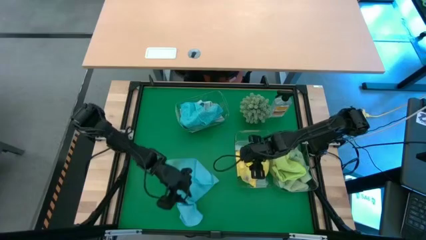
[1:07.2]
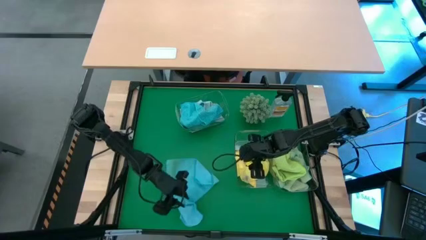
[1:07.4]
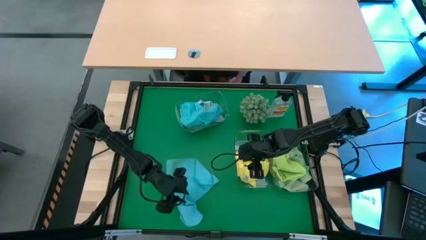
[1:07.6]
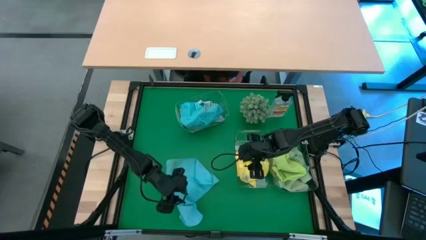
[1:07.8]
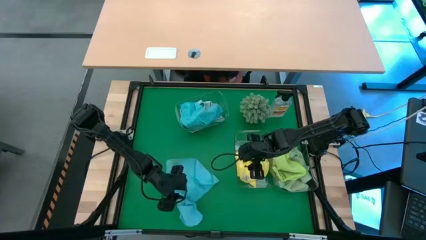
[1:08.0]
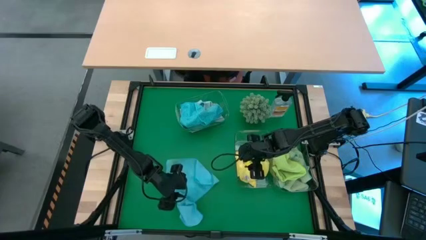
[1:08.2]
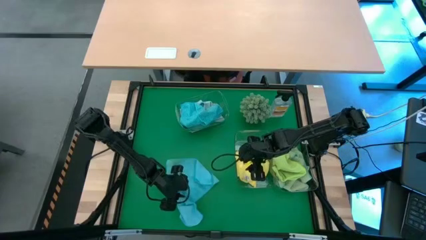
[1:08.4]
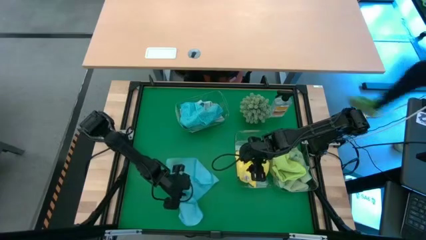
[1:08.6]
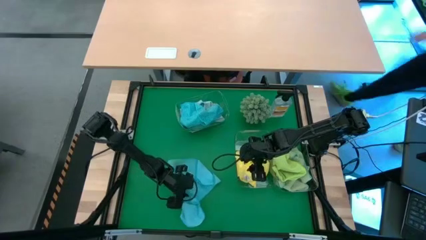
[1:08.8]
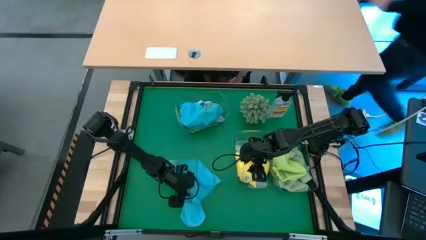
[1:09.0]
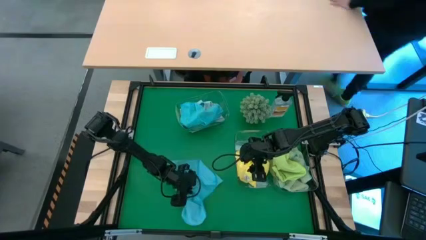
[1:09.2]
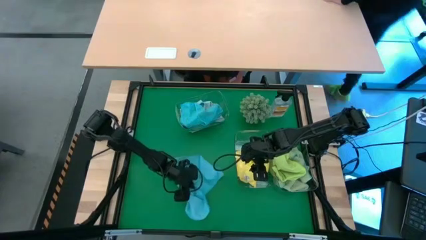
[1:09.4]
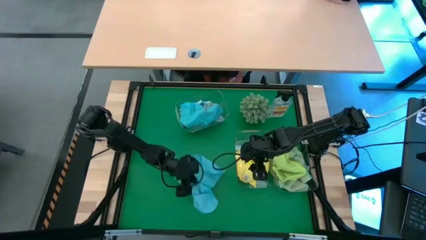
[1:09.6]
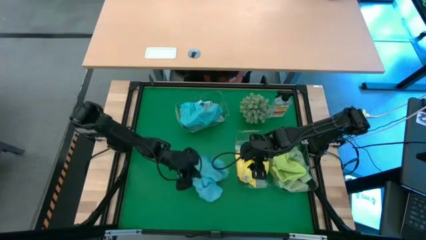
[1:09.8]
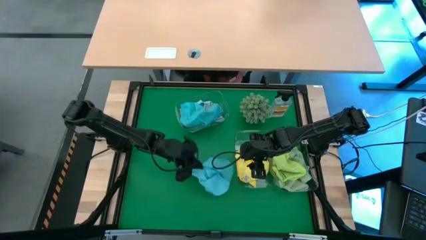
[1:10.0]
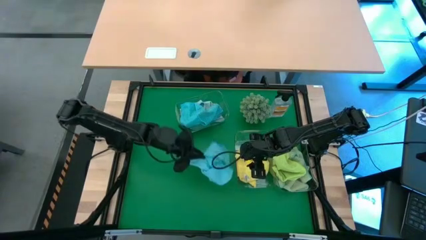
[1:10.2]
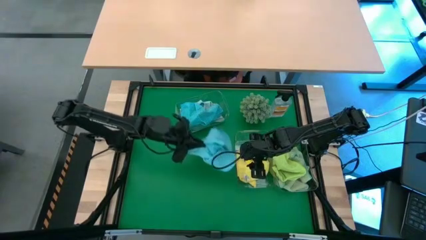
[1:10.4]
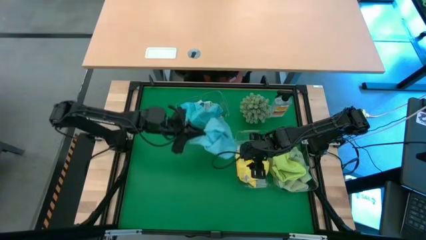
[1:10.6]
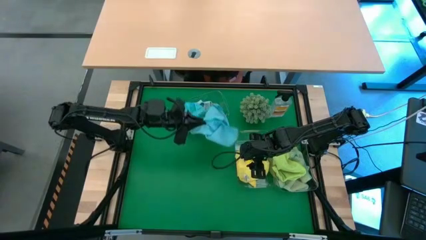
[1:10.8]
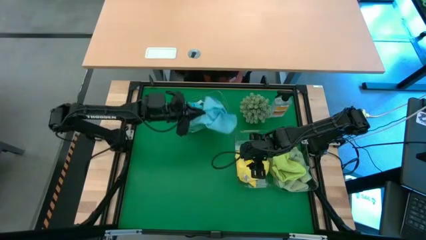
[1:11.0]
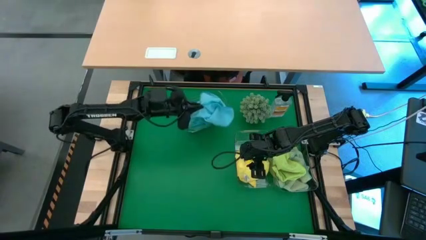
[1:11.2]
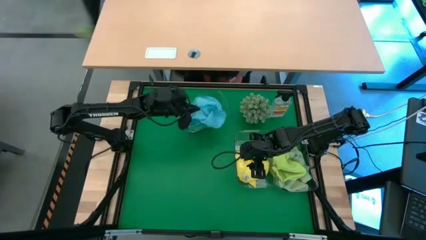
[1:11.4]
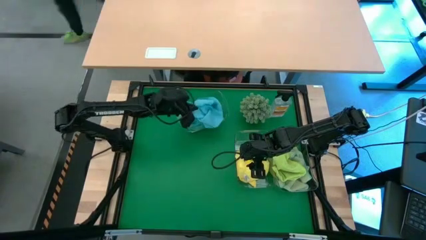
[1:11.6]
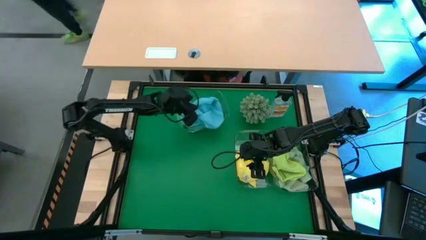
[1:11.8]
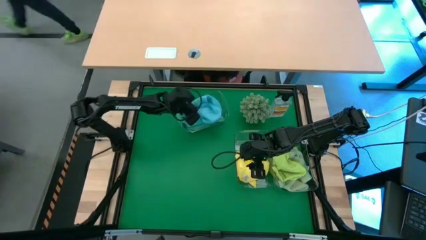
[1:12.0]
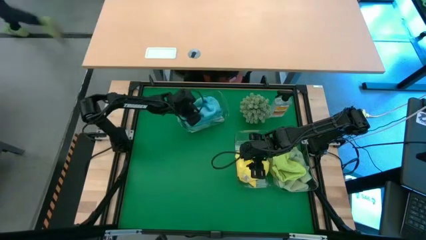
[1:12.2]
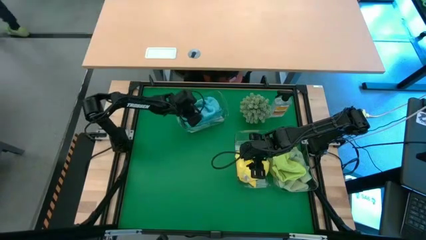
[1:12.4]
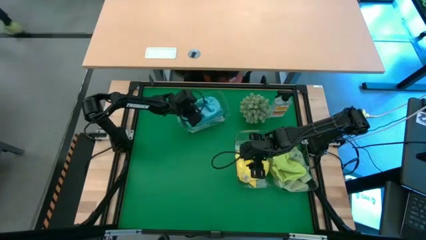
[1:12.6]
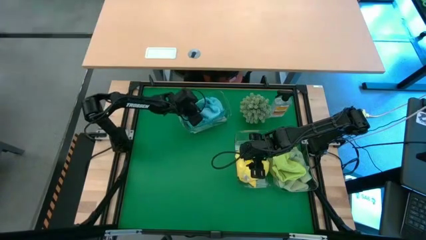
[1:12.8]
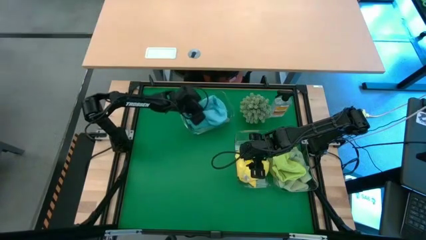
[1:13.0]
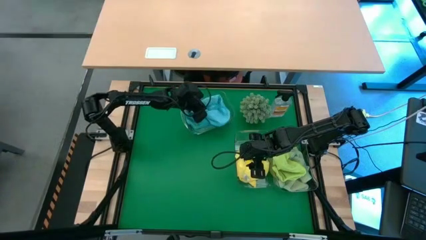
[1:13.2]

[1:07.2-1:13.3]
Task: Sort microfiber towel by color & place in baskets
Put the blue towel into the top transparent bin

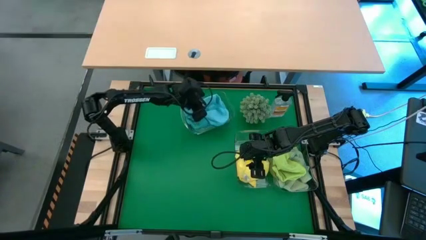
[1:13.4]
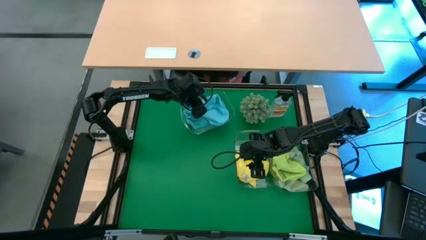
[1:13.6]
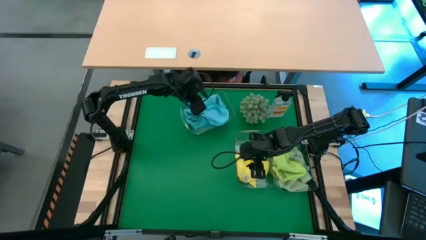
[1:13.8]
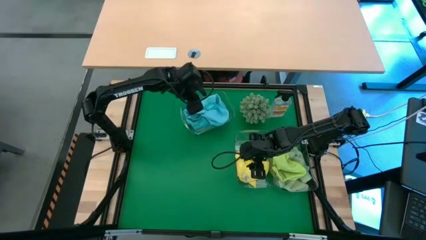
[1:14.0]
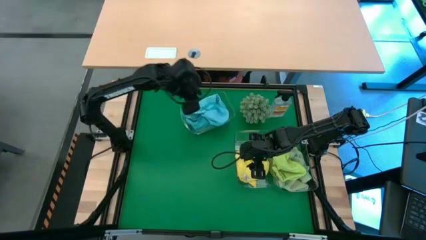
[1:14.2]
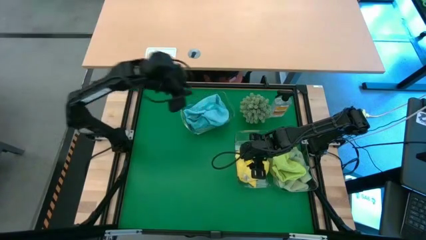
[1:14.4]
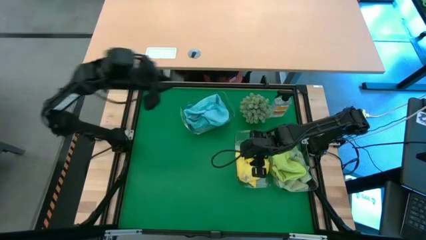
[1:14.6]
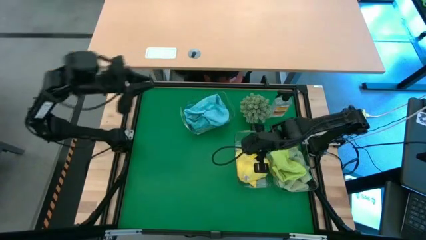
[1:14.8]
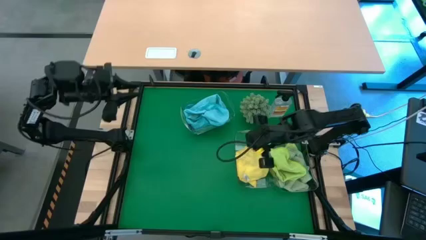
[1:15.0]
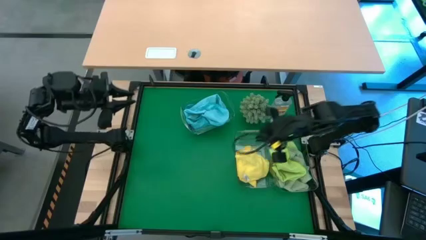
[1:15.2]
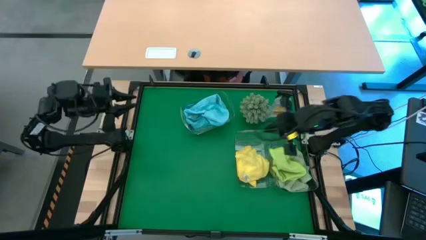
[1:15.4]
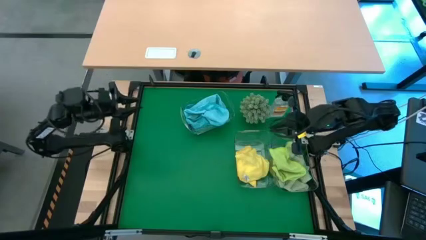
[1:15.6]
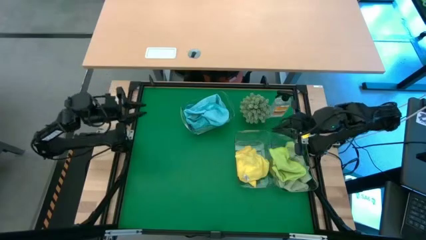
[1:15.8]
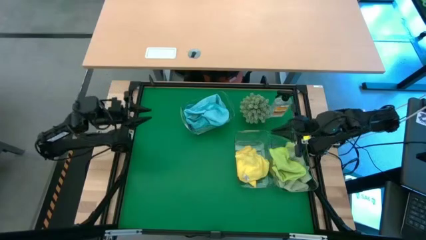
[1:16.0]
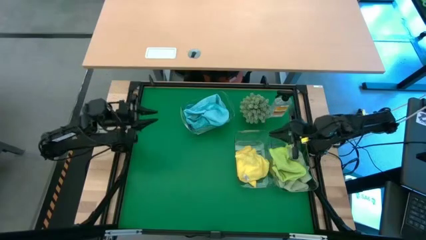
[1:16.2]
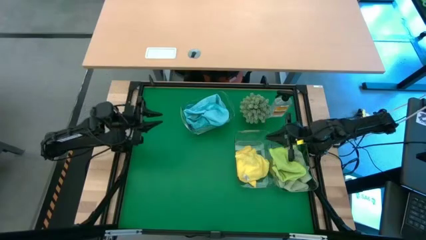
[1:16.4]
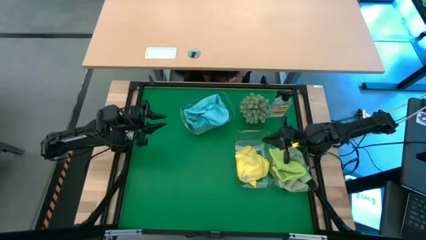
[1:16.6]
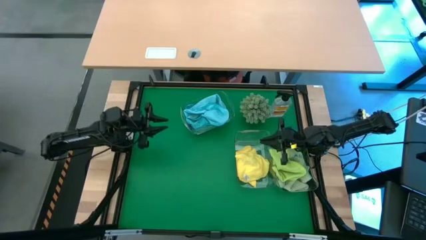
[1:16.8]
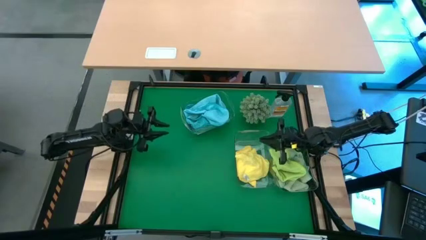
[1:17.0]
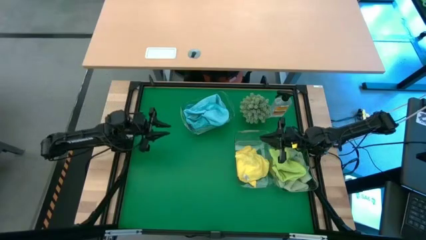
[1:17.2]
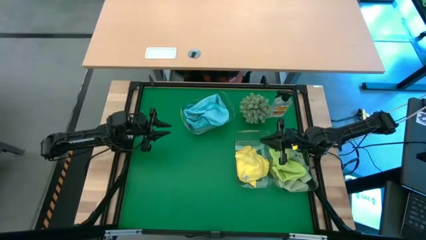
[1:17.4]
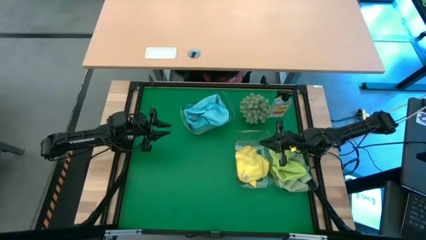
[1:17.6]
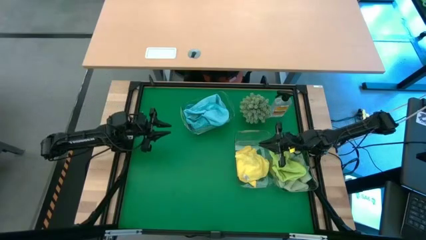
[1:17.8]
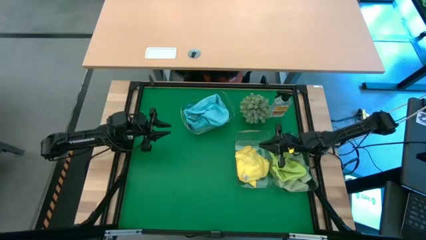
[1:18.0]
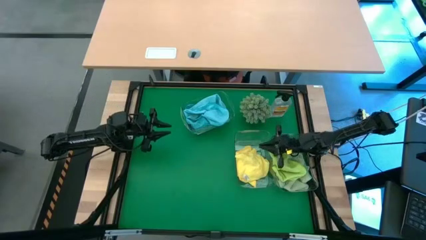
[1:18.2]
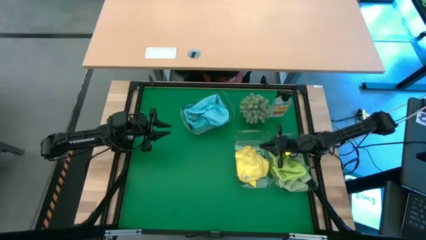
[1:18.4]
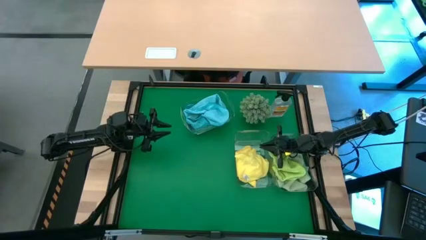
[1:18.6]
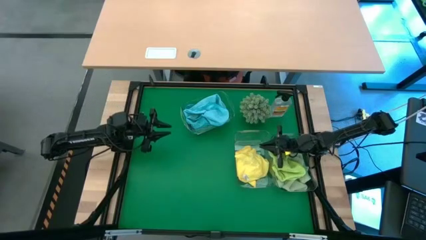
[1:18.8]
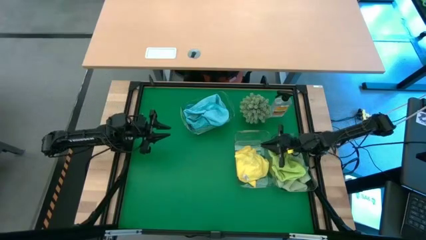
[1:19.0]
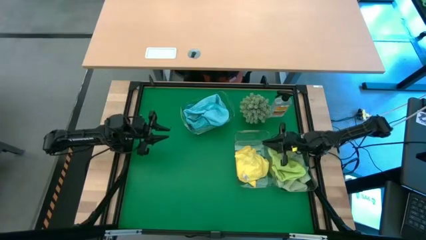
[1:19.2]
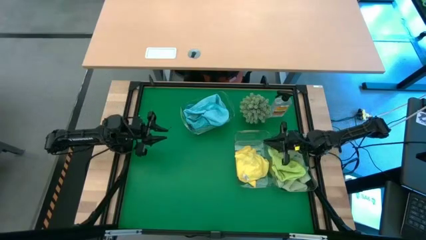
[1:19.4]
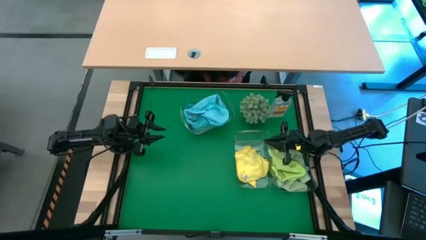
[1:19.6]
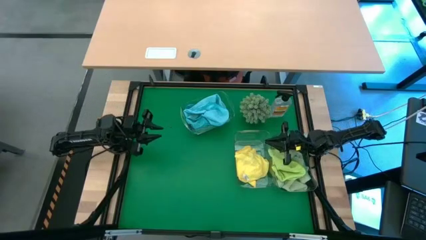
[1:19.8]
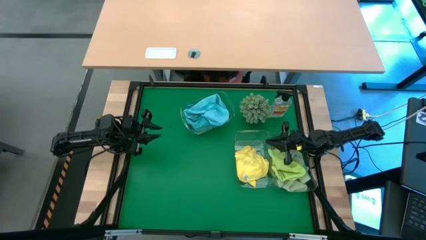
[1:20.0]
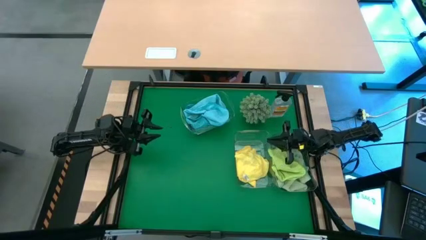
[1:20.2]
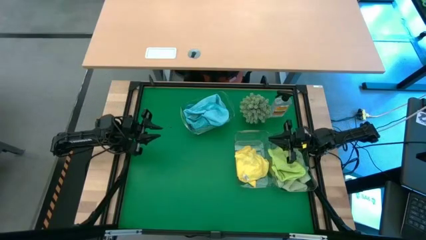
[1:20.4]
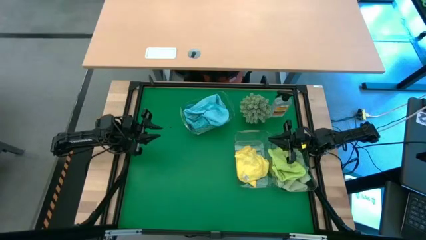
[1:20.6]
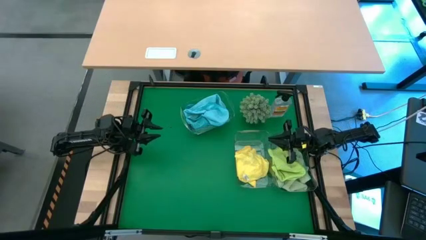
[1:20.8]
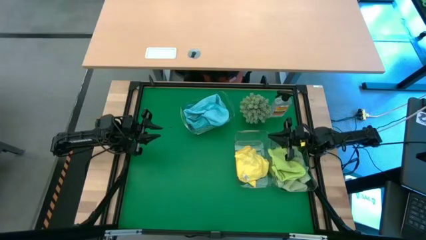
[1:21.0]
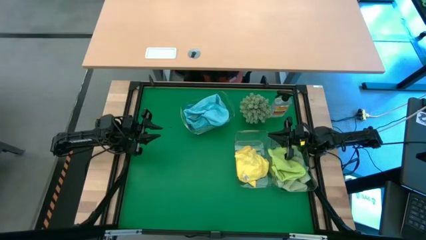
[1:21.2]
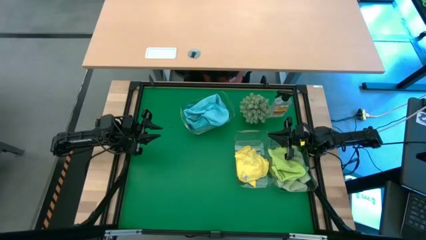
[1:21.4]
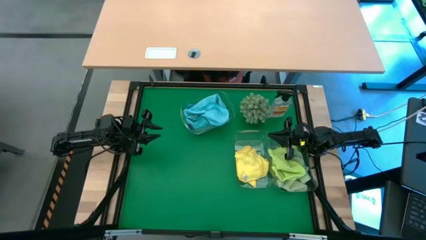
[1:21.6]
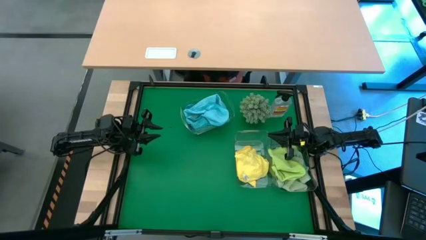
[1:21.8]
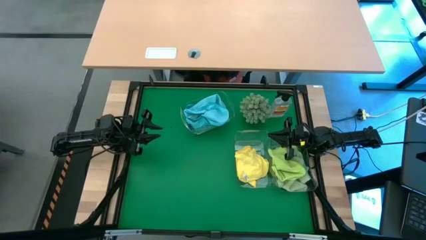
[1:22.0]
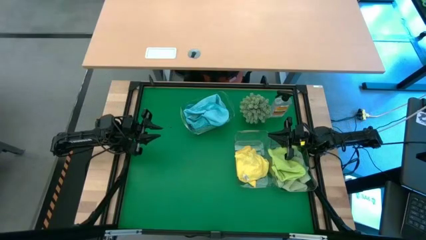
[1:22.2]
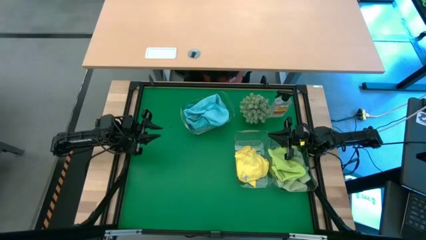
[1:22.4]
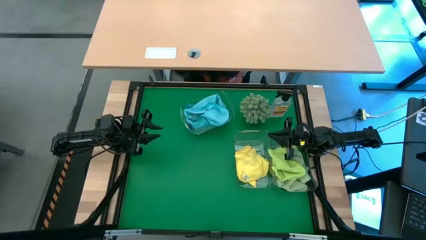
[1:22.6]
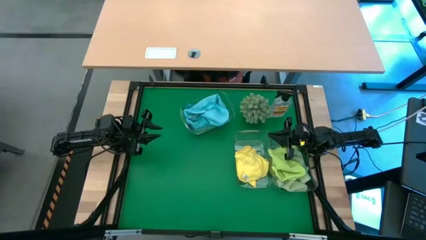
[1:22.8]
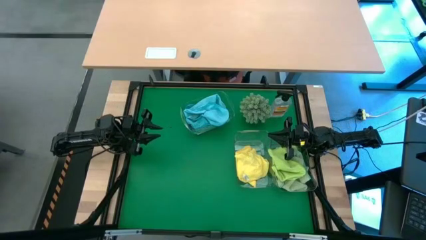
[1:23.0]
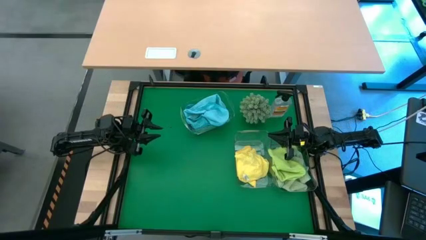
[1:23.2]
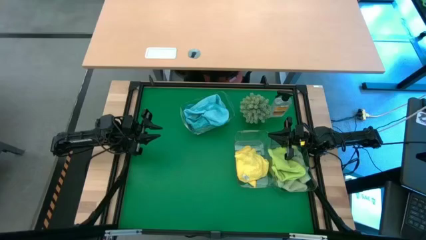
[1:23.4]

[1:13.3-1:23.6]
Return to Home Position
